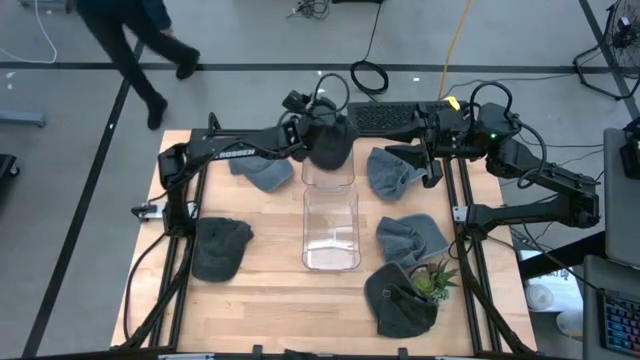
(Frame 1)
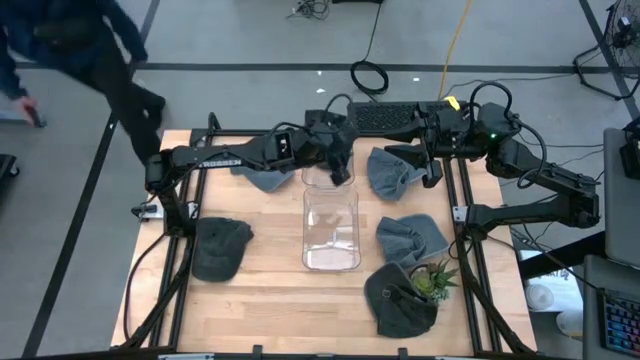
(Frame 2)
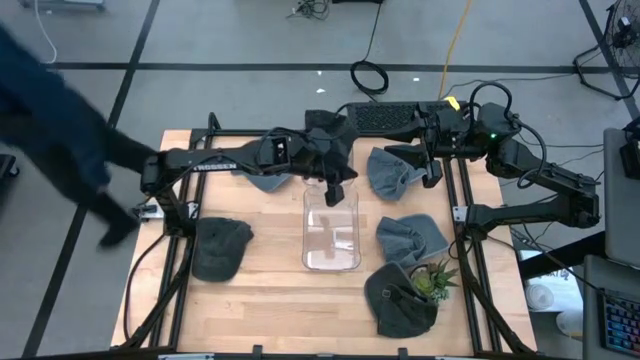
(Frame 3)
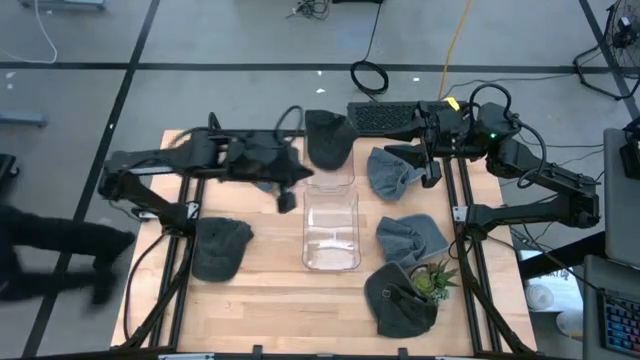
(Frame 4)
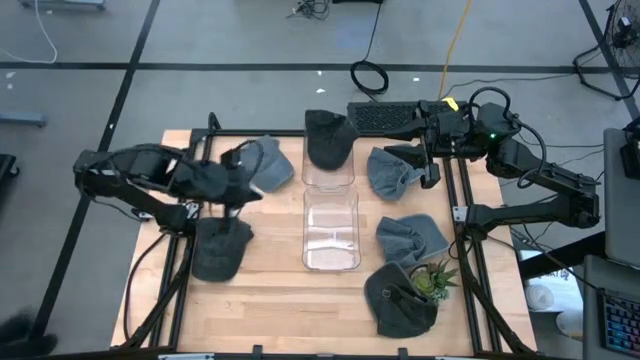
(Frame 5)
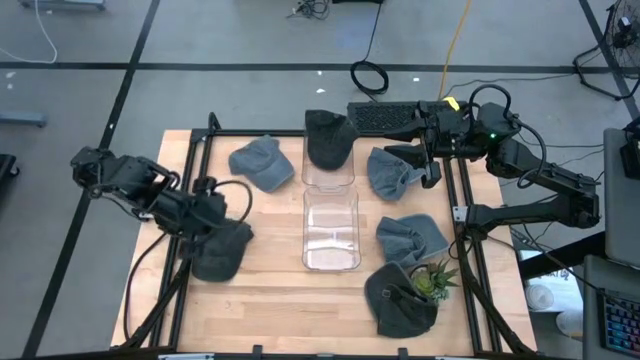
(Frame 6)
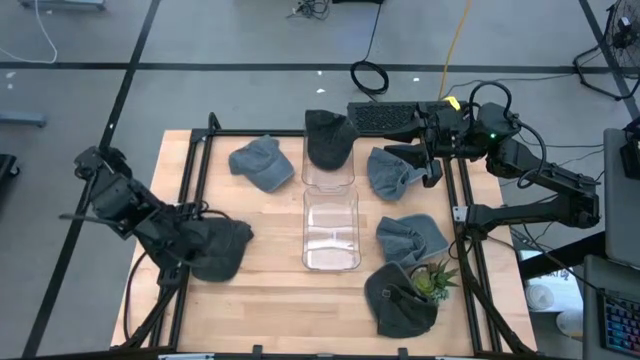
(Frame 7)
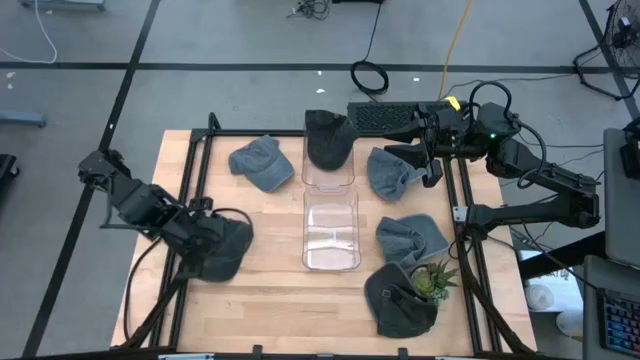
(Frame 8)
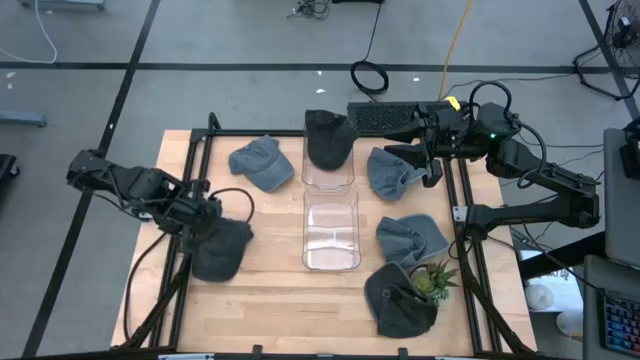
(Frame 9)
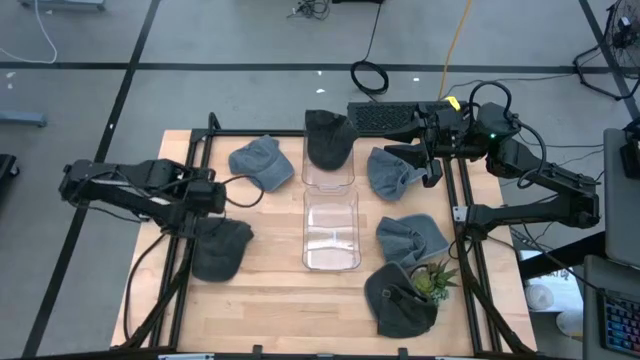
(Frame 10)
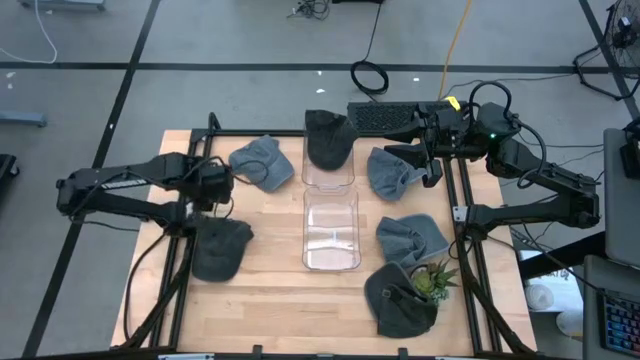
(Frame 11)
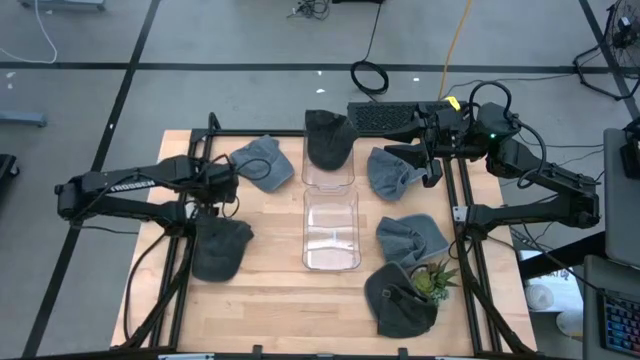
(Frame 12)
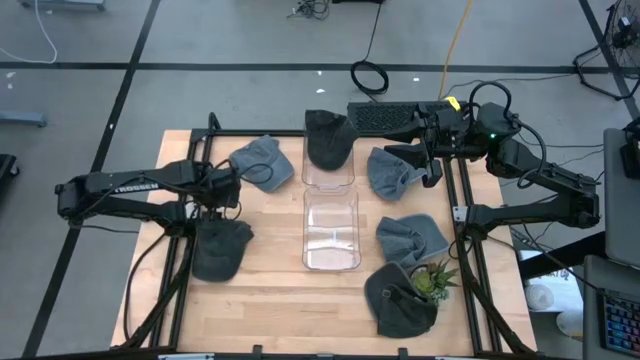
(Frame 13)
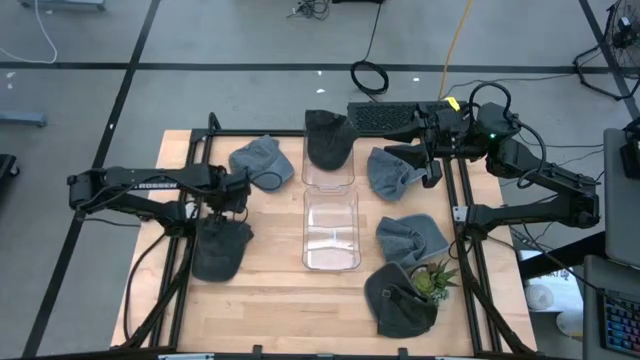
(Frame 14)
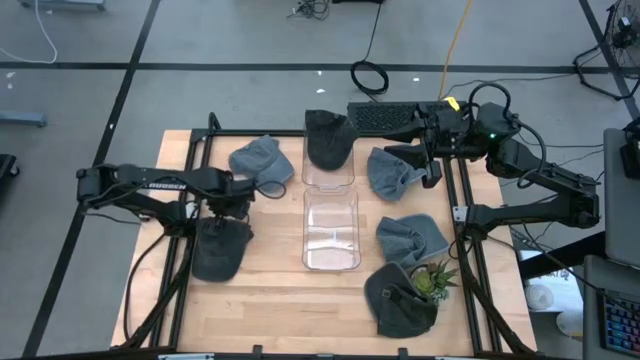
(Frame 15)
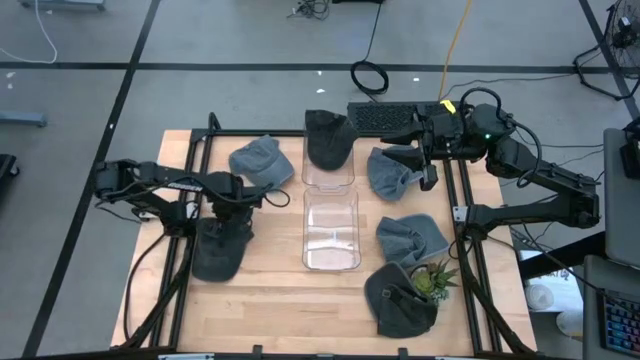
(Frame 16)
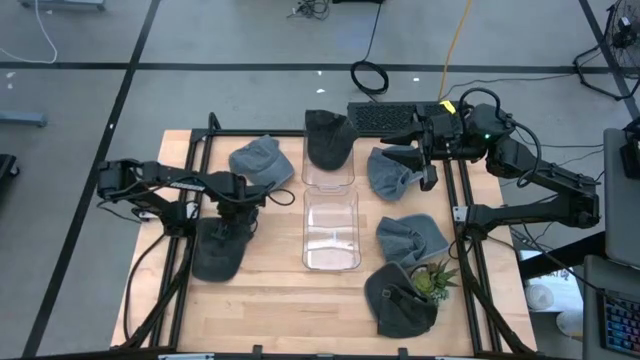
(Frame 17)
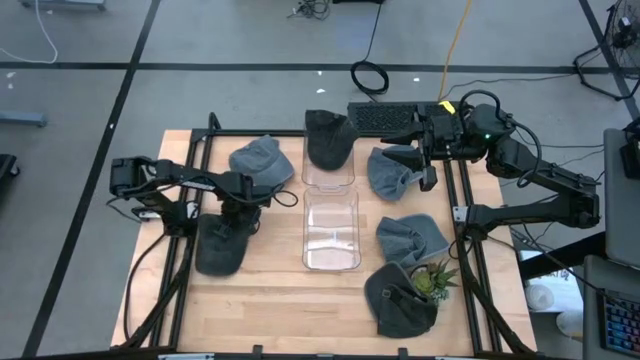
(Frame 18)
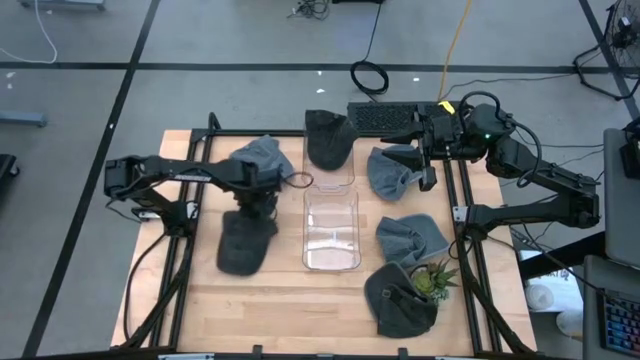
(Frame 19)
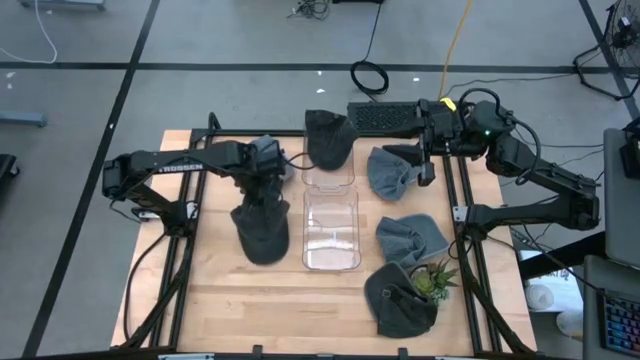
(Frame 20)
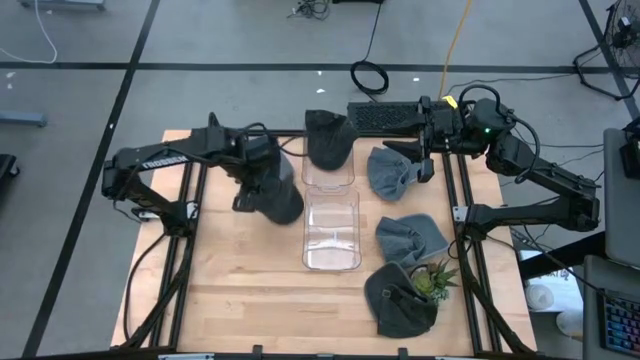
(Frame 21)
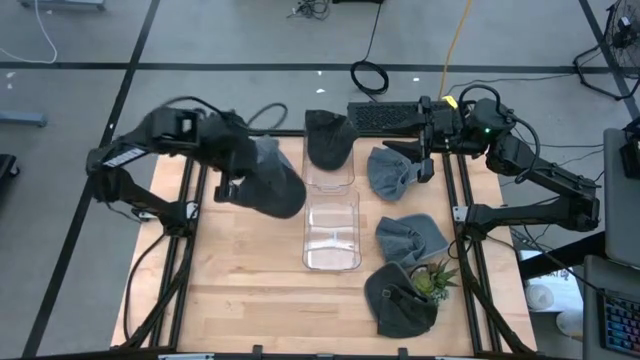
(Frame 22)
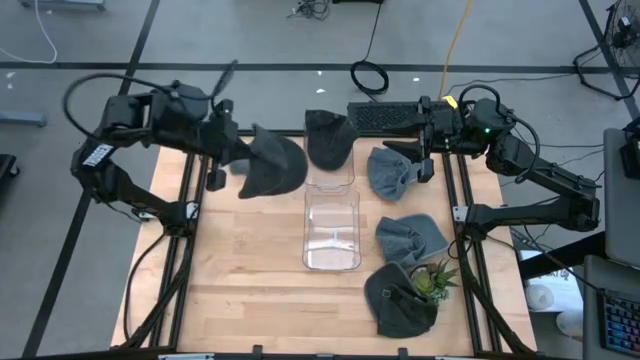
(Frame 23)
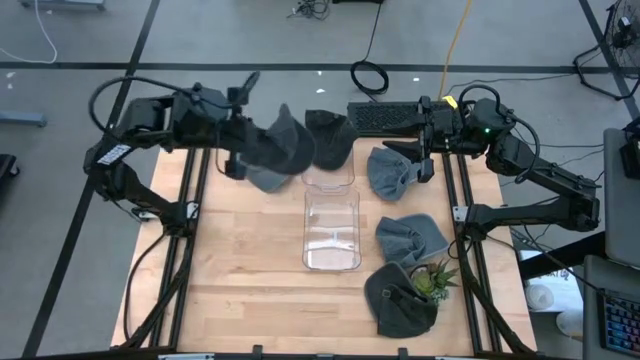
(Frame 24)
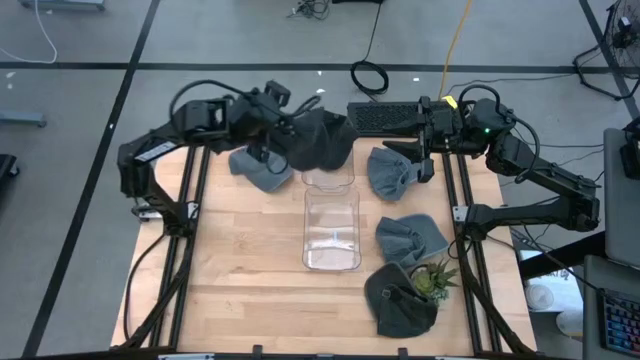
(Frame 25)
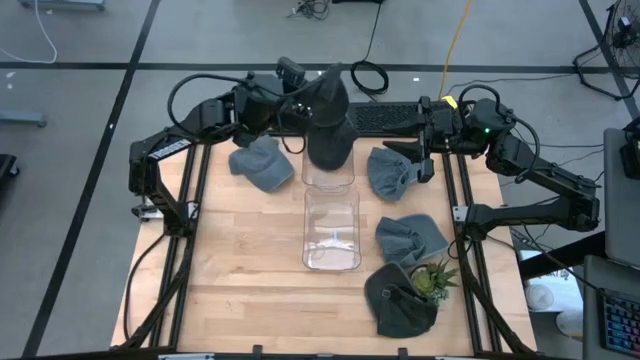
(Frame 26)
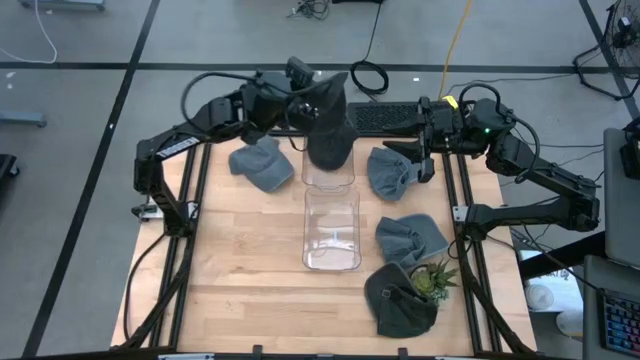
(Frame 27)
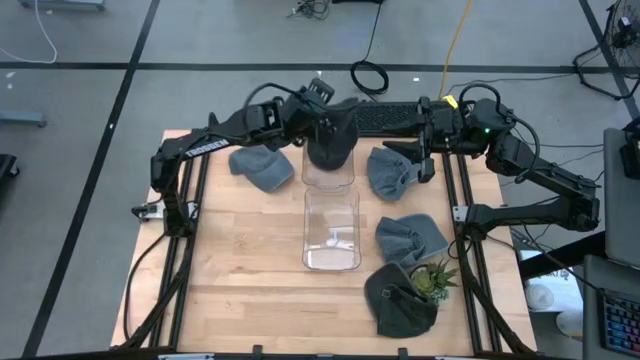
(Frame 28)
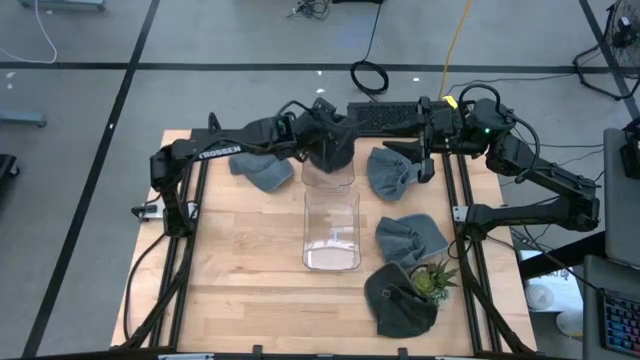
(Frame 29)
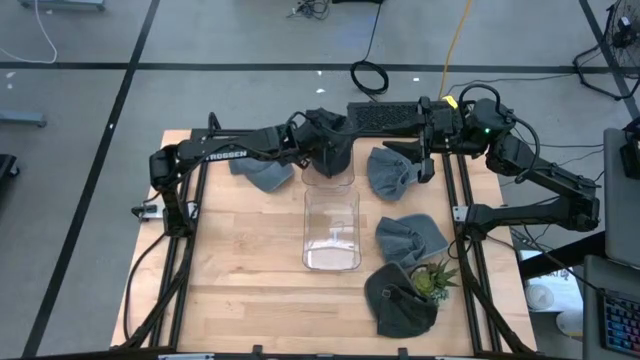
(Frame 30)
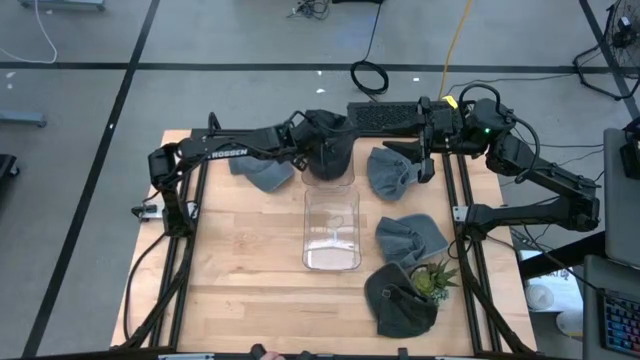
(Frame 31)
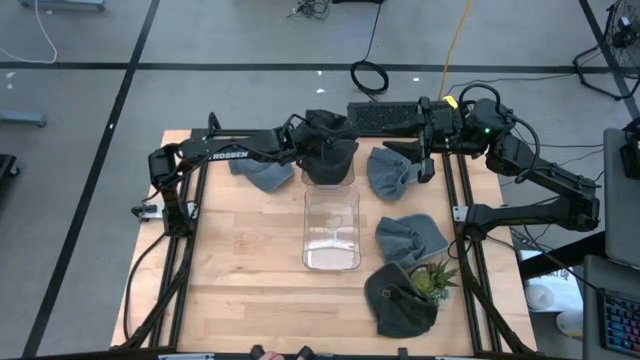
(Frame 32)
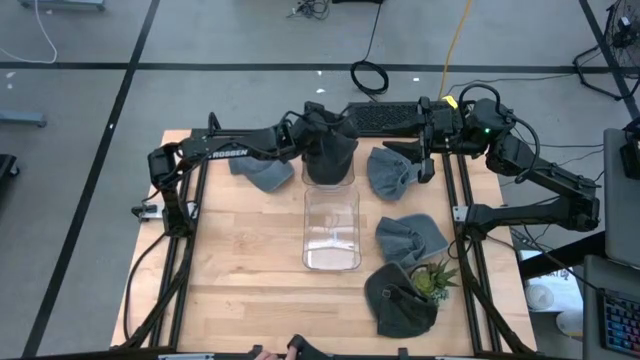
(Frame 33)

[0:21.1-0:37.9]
Task: Pick & Place hat
Put the top black cap into the top transparent bin
